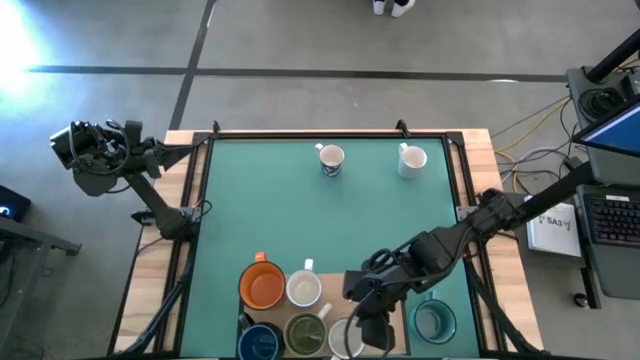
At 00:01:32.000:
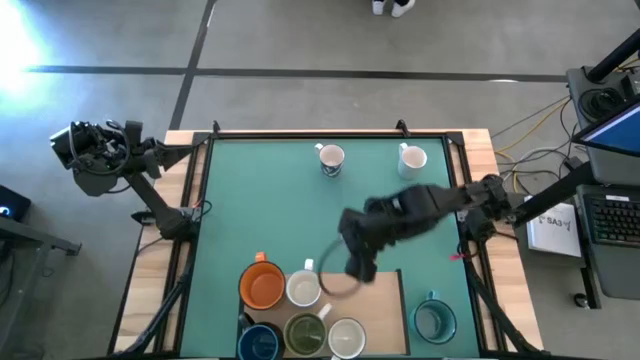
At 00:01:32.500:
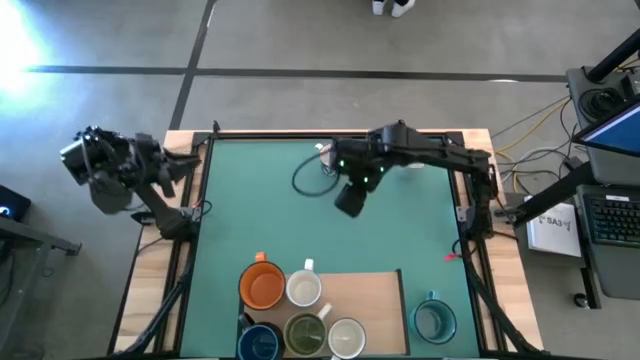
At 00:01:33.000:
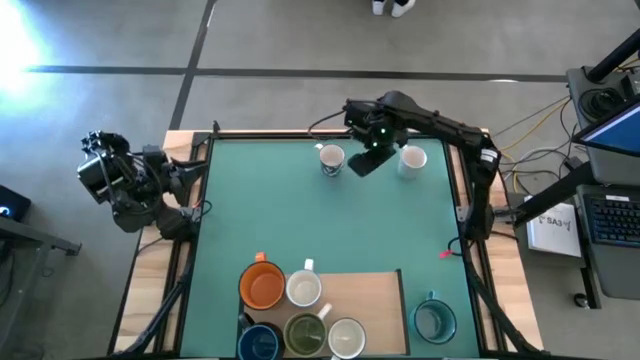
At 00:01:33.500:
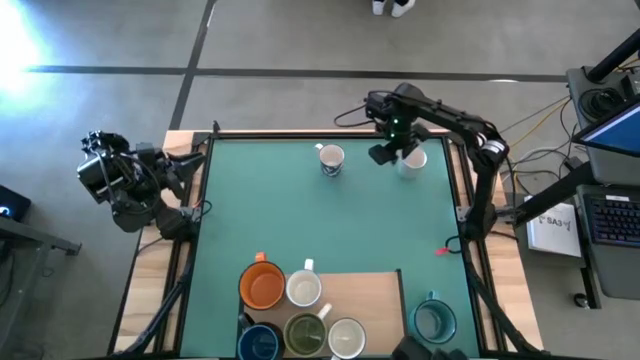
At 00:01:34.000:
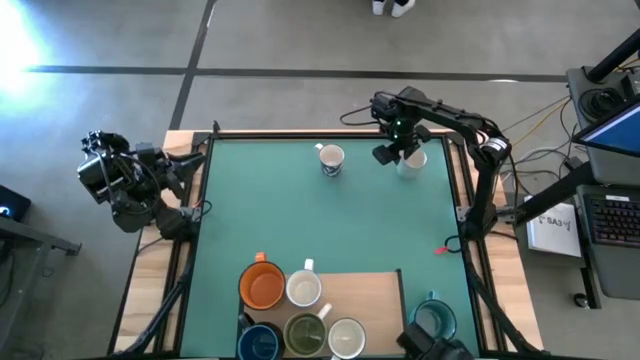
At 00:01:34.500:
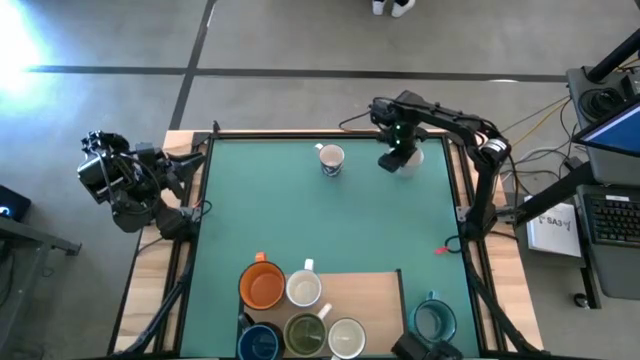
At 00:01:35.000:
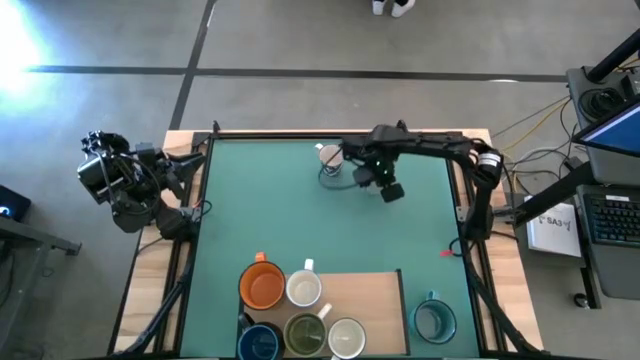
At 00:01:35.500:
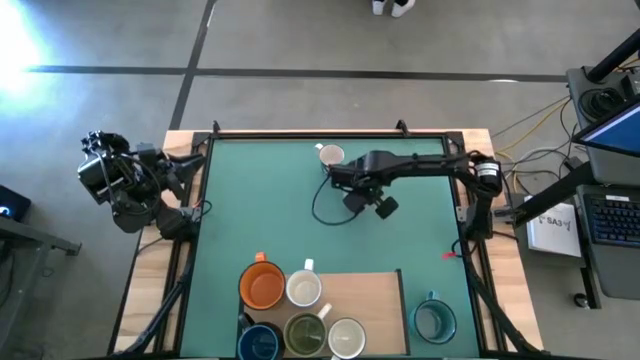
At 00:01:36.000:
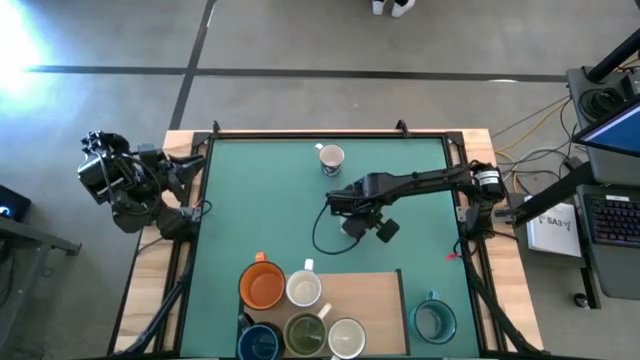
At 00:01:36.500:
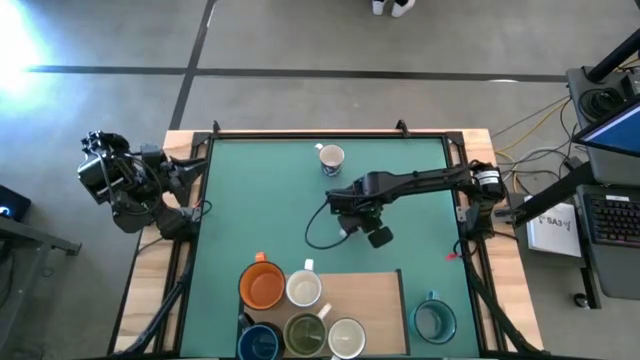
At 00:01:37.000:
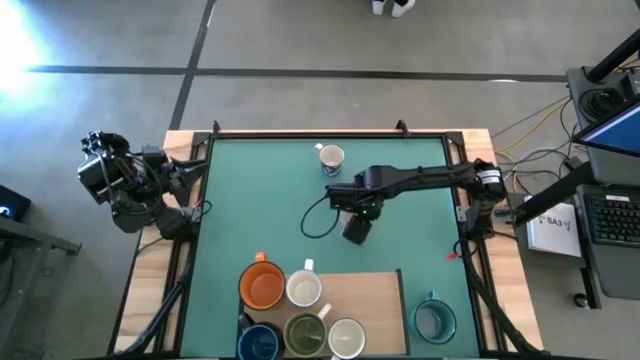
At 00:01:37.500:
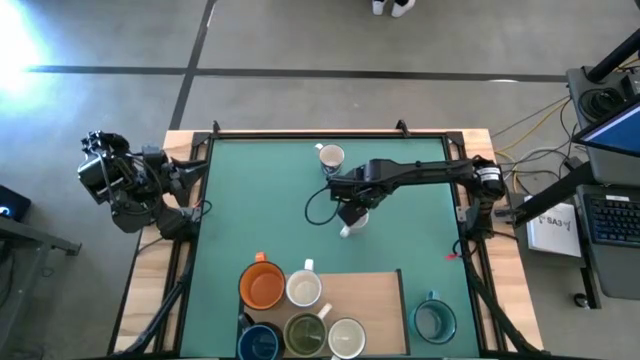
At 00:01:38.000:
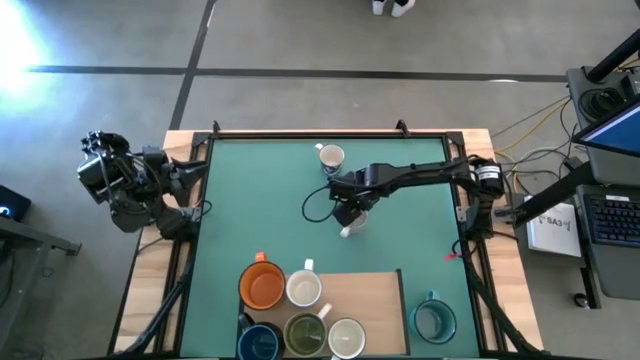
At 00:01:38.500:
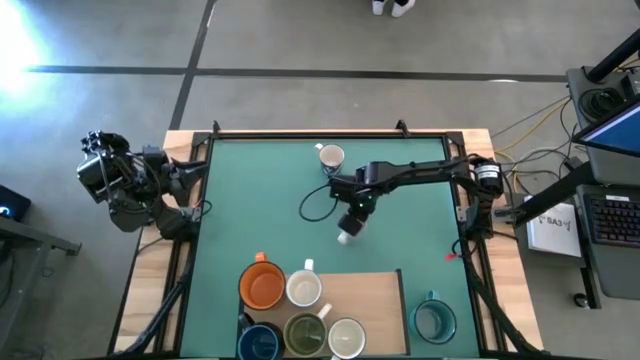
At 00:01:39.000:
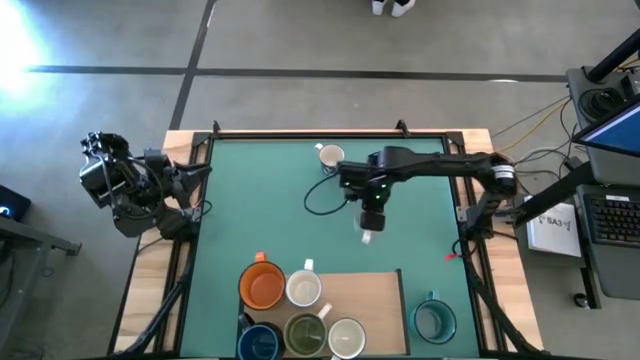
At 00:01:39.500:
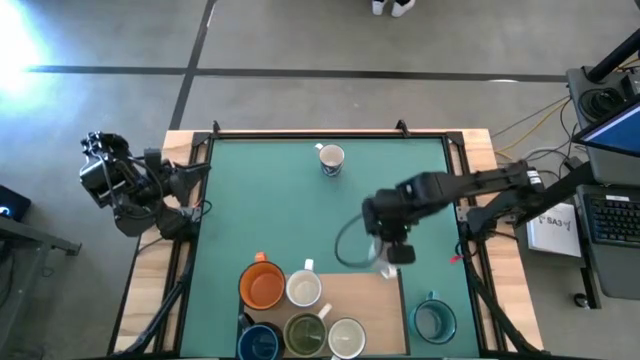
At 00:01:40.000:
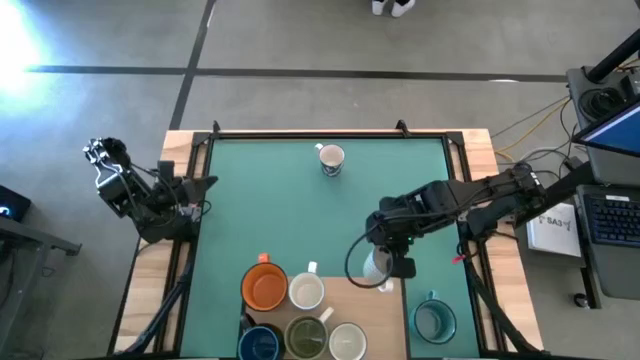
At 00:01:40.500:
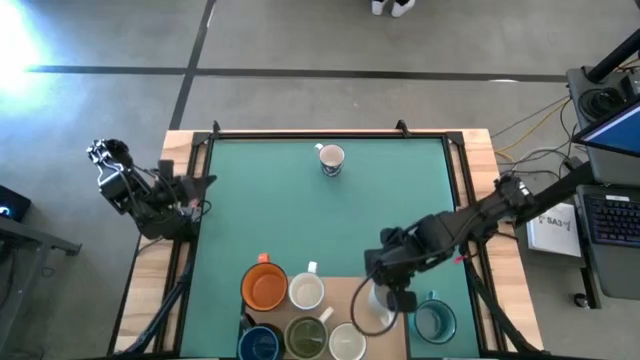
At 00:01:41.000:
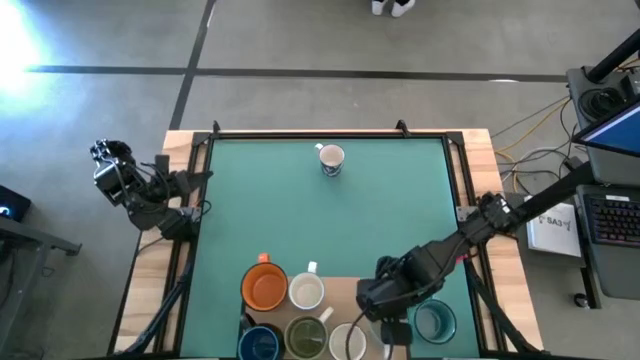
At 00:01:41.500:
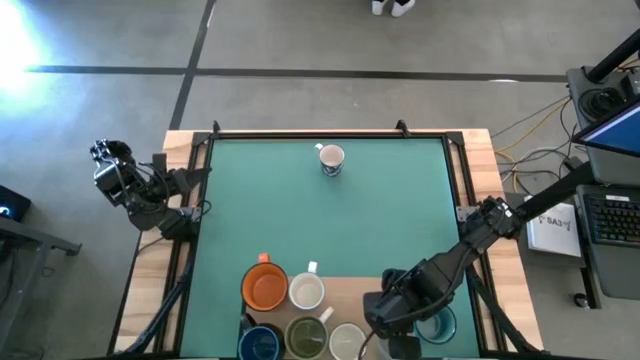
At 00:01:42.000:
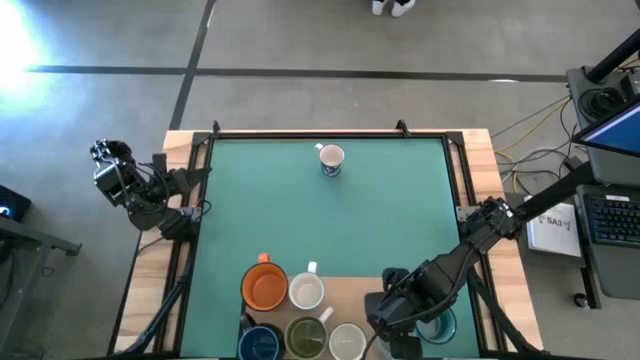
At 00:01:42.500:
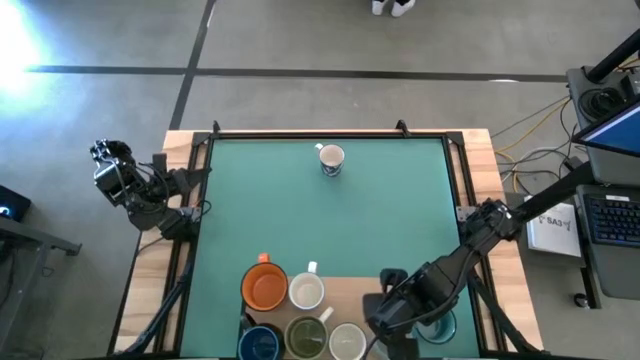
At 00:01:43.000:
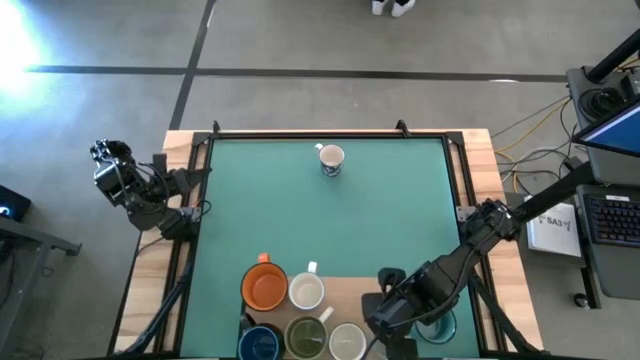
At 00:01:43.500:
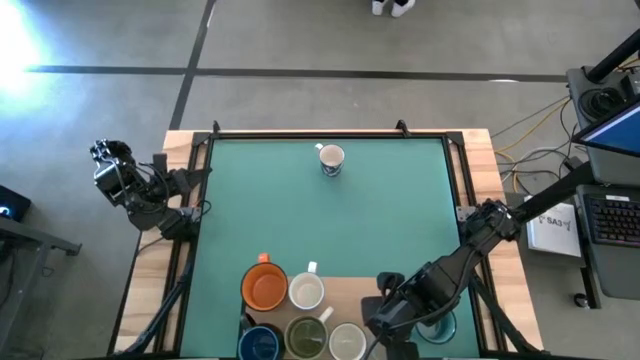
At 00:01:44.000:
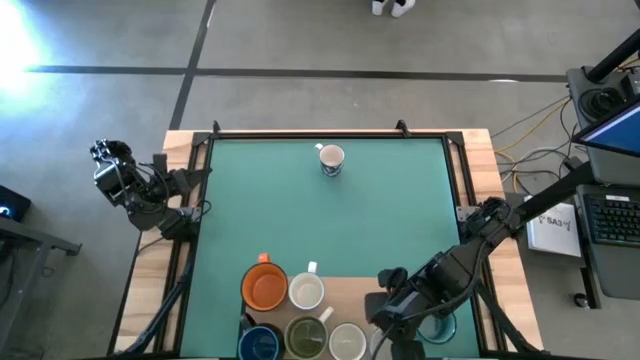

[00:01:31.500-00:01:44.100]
Task: Place coffee mugs
Put the green patterned mug on the shelf

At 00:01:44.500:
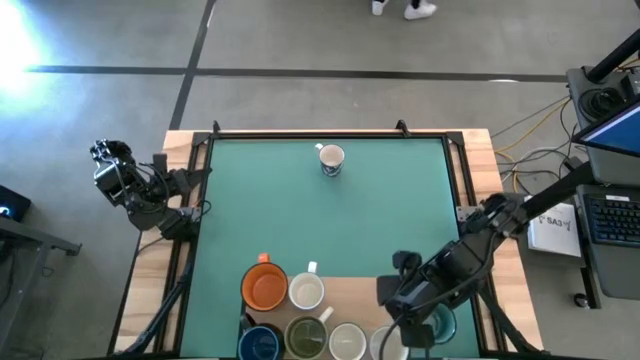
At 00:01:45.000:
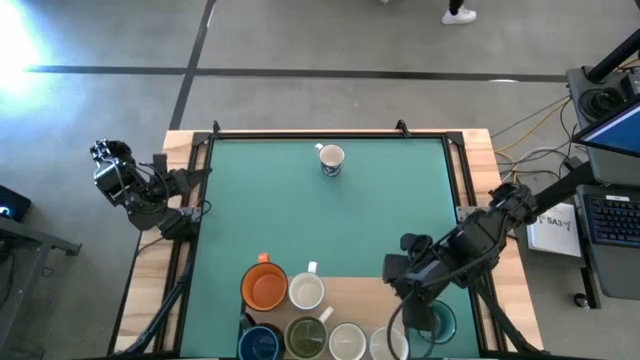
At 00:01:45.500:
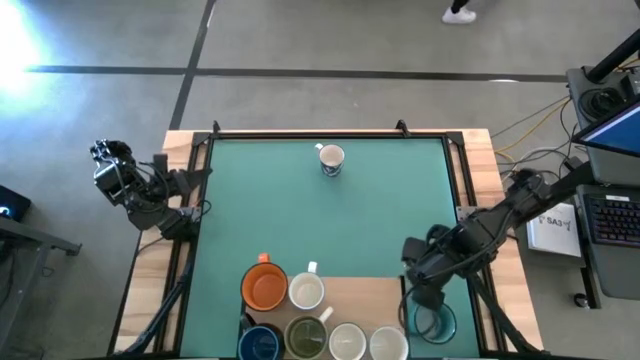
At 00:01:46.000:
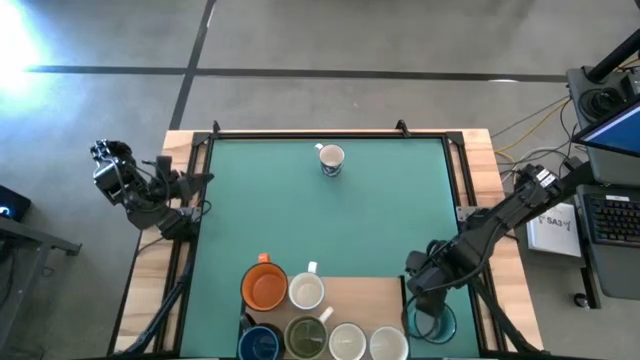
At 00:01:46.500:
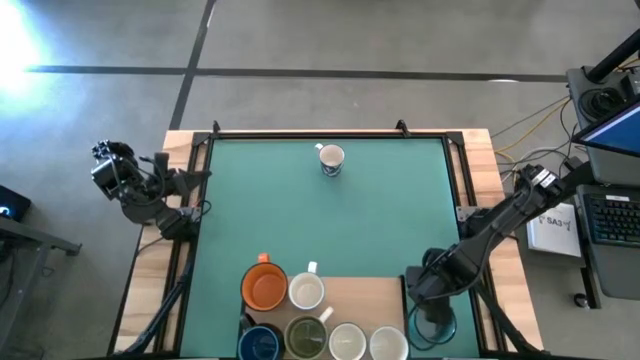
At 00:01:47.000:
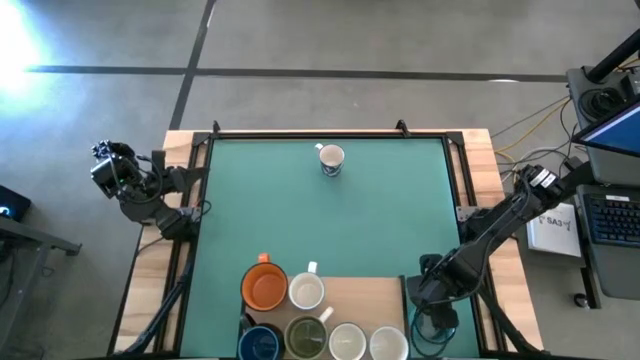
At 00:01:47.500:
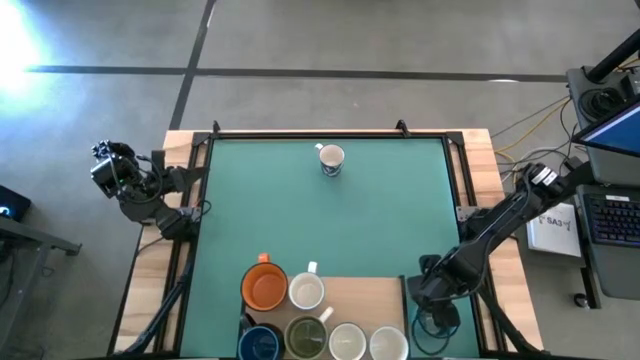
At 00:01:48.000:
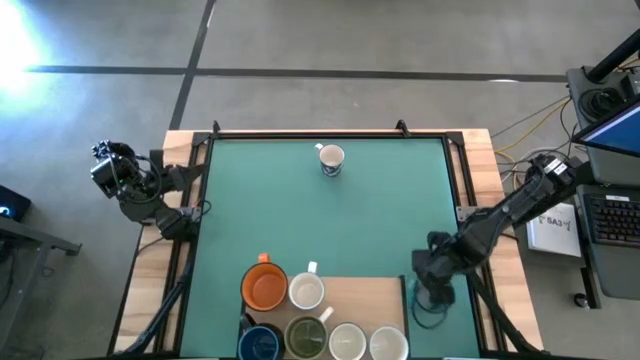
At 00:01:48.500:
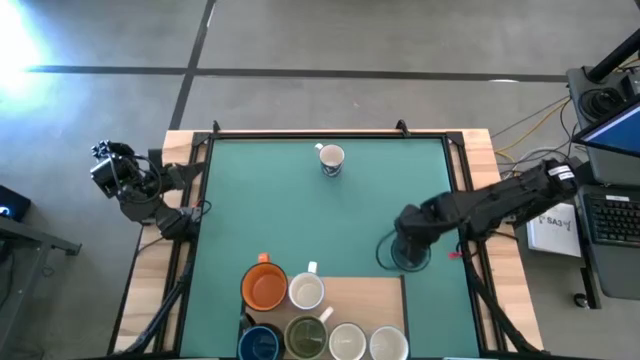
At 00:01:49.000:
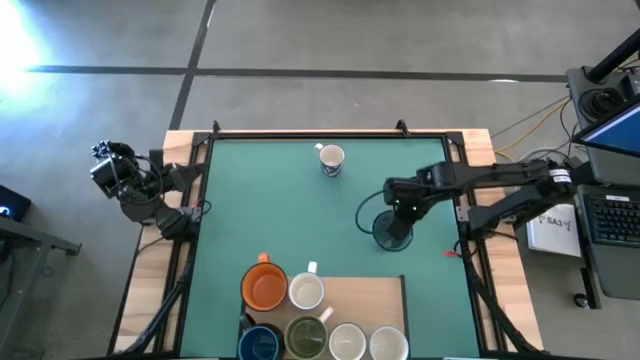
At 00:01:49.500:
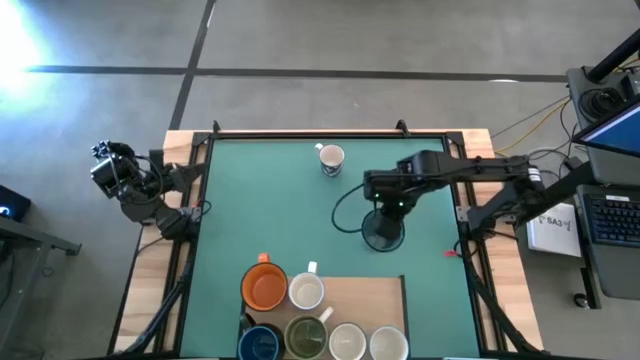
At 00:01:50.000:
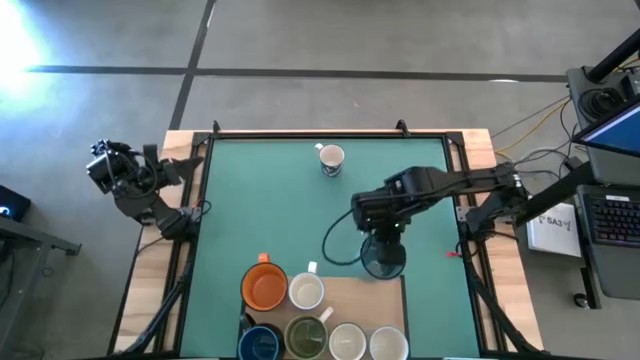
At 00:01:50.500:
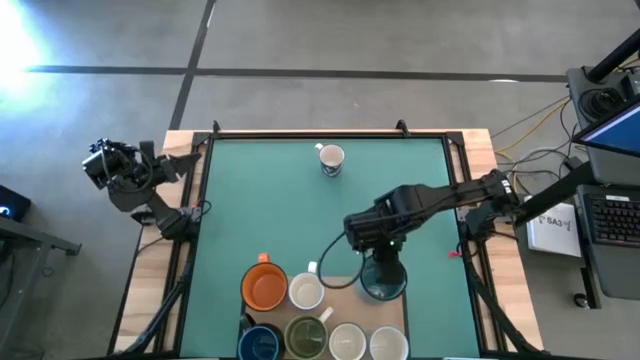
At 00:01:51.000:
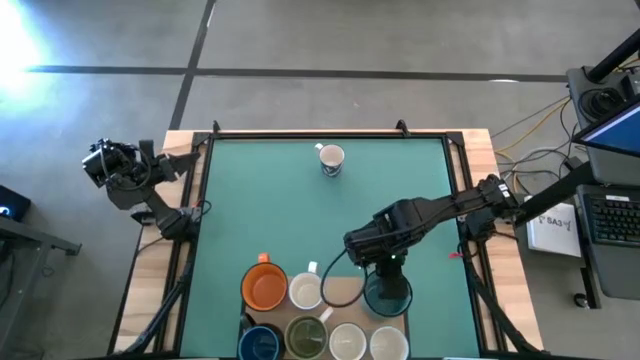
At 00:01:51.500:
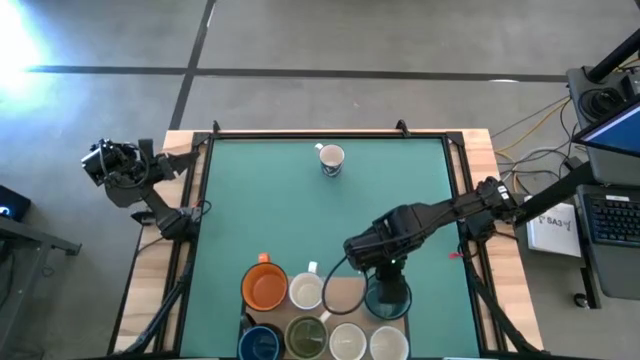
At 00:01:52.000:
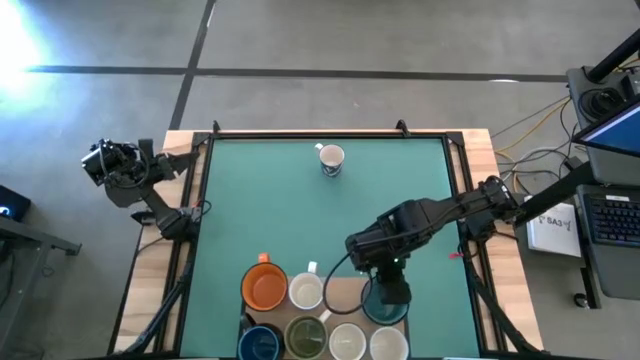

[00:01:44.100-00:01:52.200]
Put the light blue mug on the shelf

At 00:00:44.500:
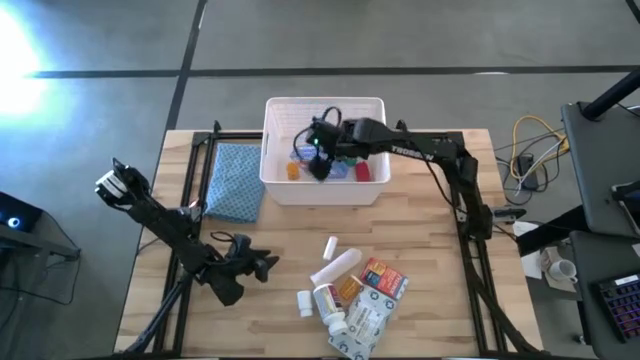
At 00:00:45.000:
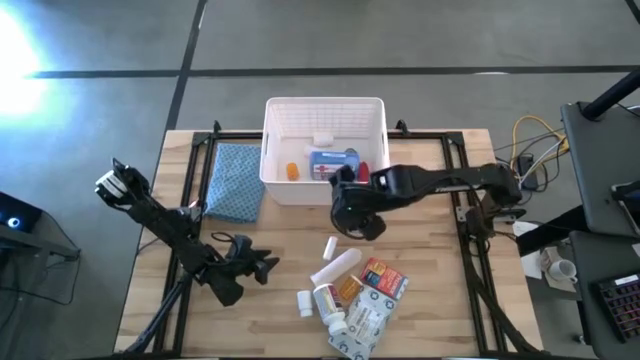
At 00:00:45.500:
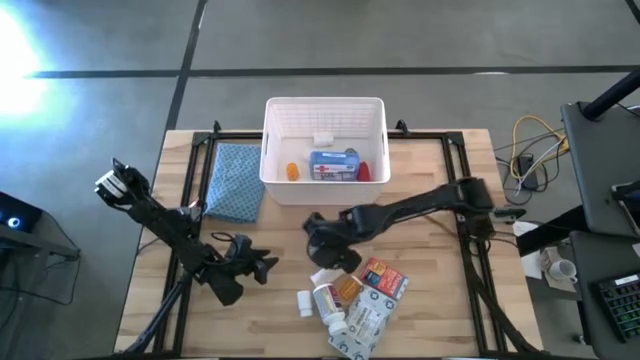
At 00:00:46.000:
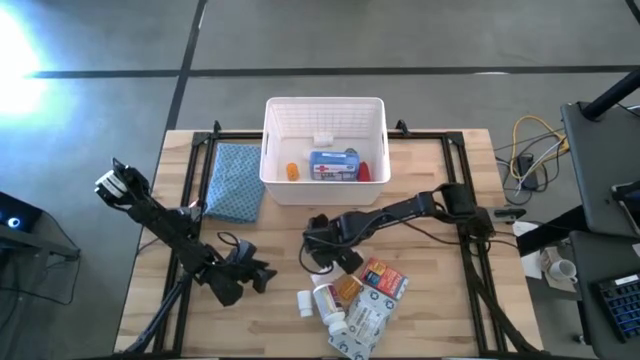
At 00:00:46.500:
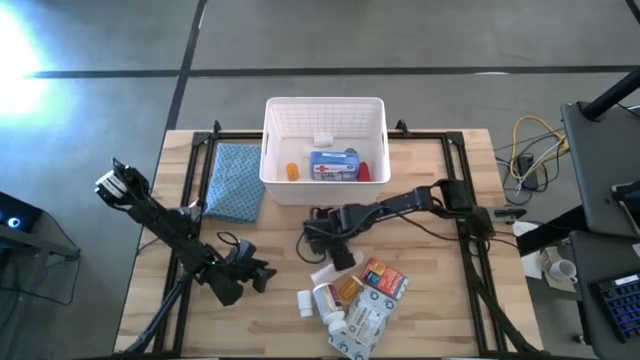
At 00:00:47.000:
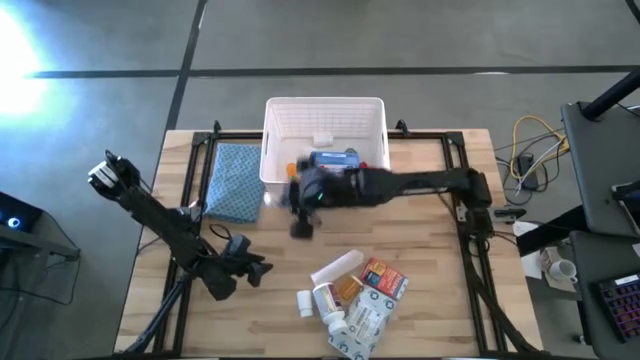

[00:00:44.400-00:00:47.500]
Task: Pick & place medical supplies in basket/bin
Put the white gauze into the white bin
